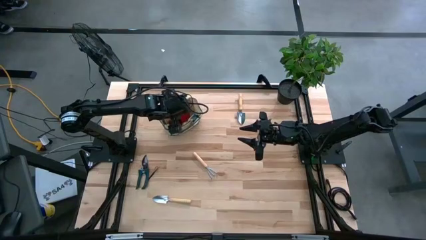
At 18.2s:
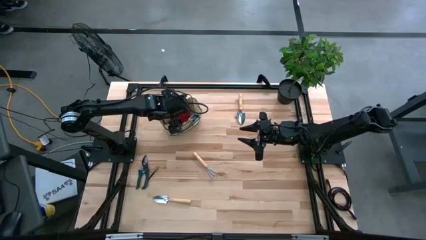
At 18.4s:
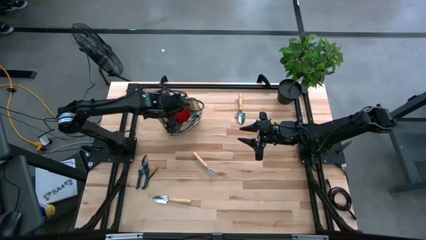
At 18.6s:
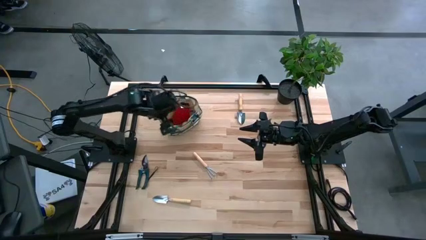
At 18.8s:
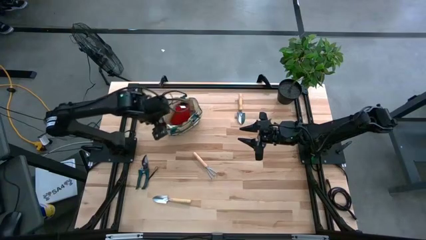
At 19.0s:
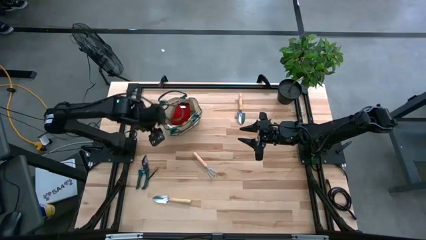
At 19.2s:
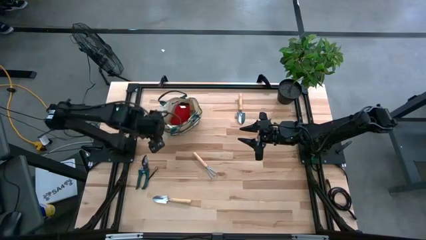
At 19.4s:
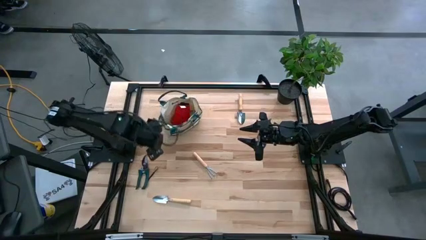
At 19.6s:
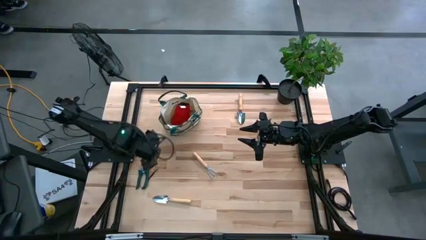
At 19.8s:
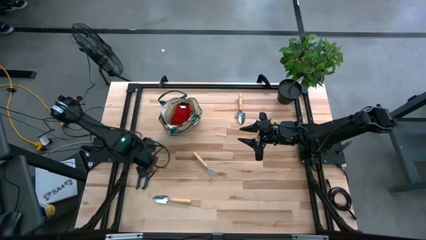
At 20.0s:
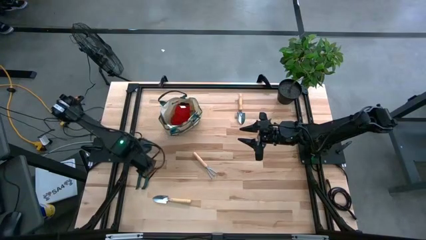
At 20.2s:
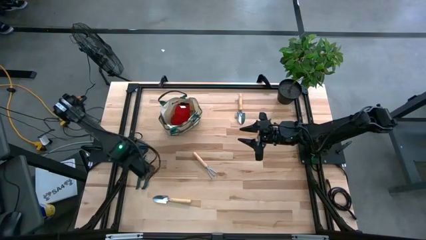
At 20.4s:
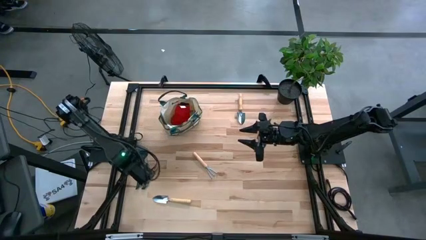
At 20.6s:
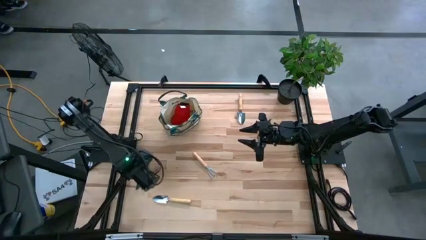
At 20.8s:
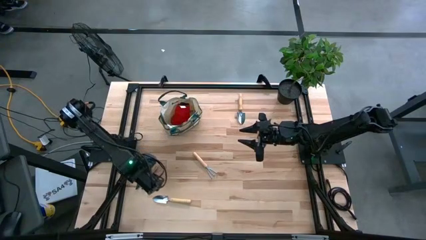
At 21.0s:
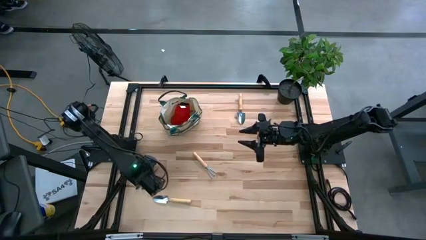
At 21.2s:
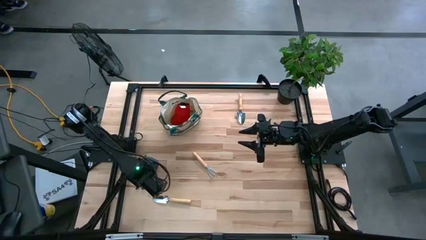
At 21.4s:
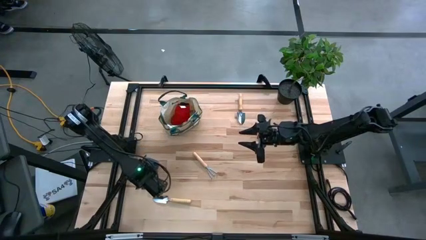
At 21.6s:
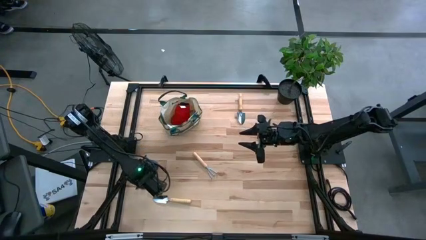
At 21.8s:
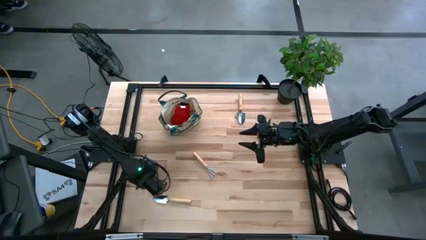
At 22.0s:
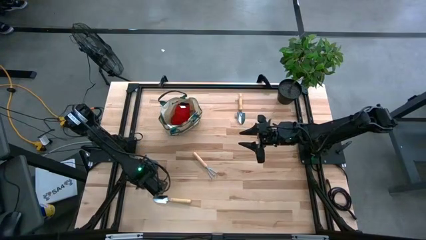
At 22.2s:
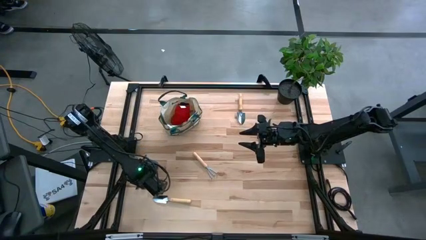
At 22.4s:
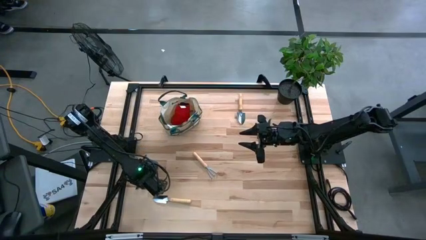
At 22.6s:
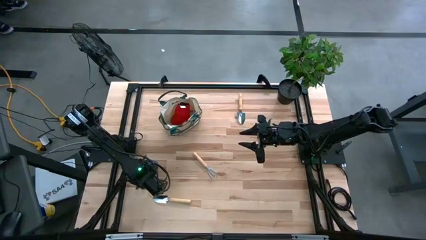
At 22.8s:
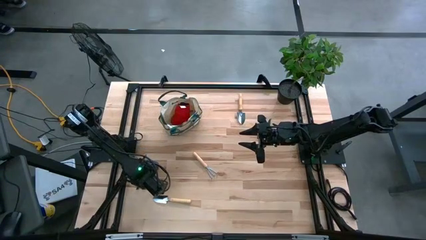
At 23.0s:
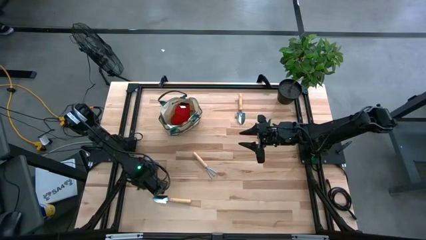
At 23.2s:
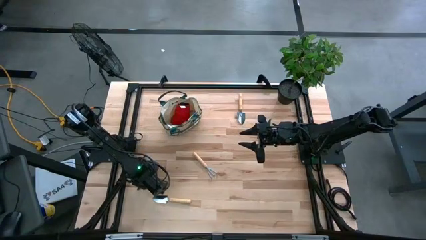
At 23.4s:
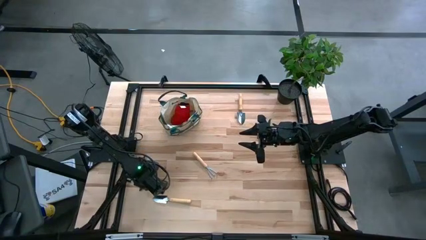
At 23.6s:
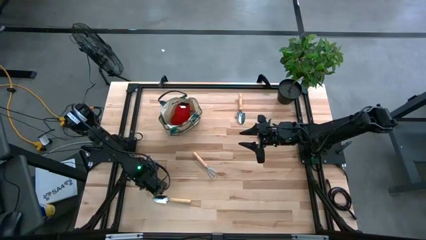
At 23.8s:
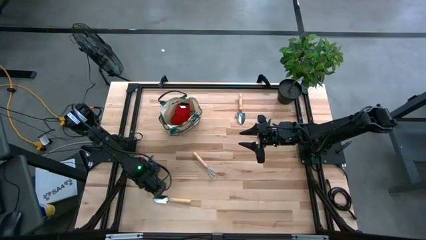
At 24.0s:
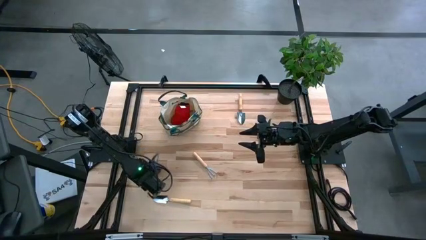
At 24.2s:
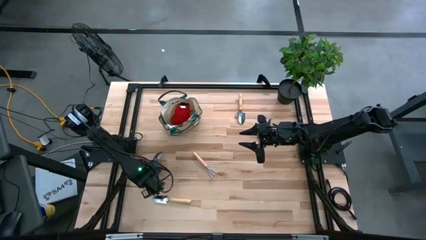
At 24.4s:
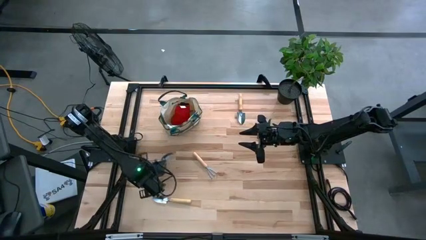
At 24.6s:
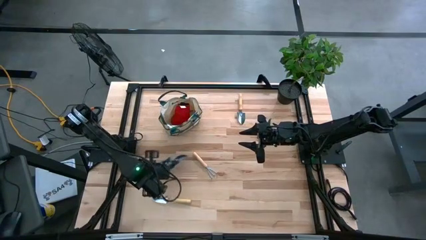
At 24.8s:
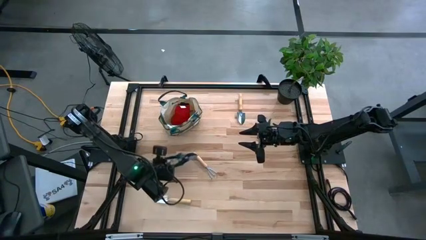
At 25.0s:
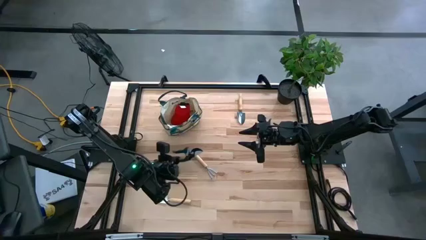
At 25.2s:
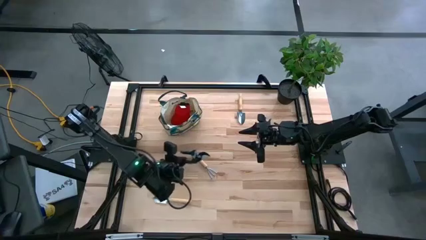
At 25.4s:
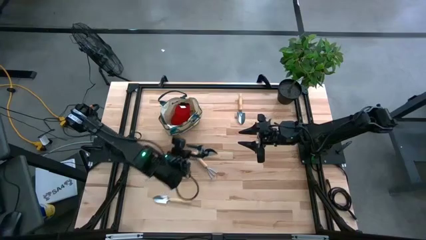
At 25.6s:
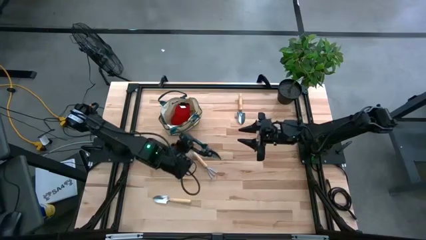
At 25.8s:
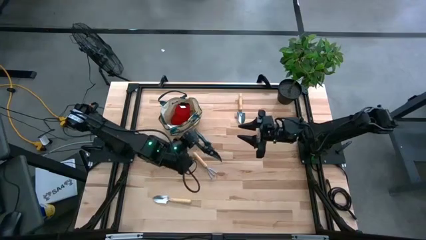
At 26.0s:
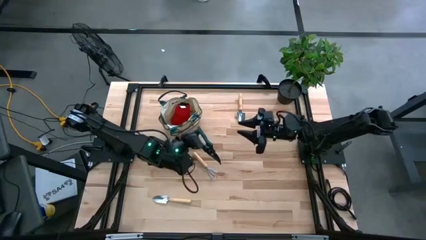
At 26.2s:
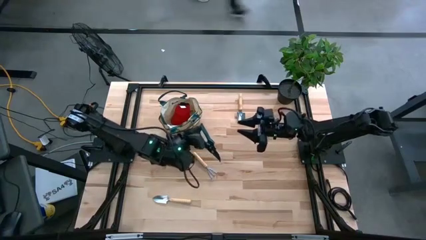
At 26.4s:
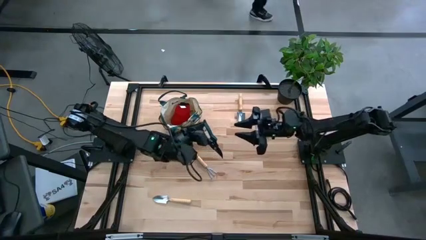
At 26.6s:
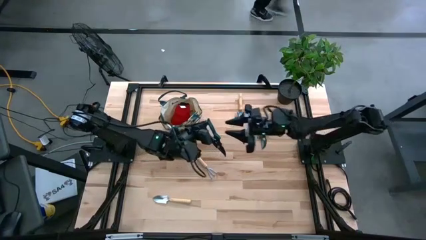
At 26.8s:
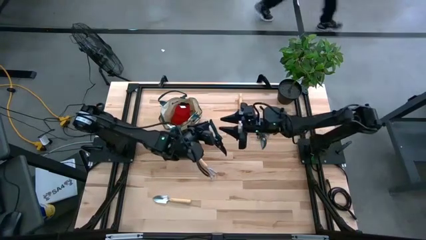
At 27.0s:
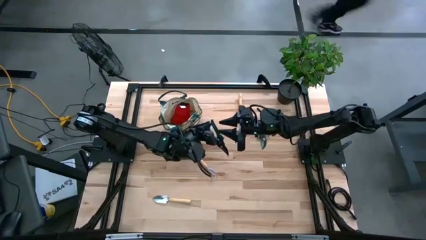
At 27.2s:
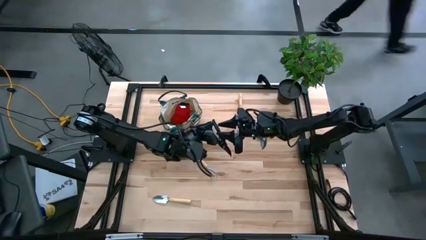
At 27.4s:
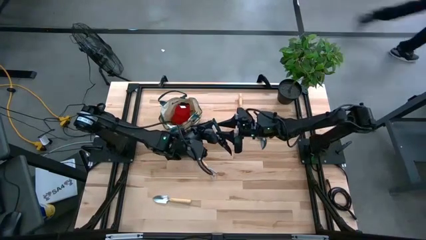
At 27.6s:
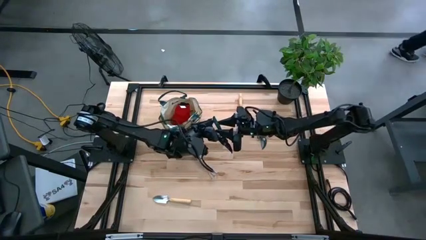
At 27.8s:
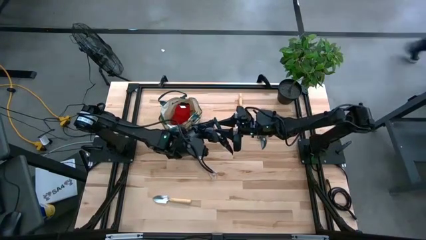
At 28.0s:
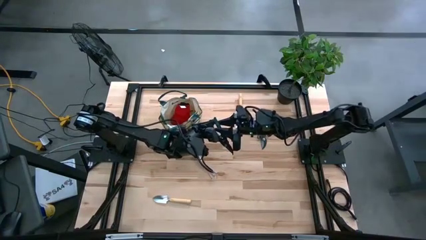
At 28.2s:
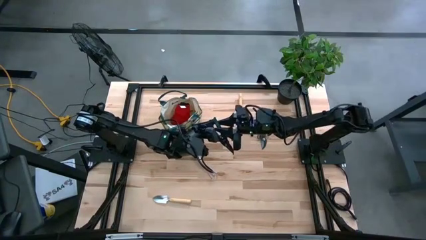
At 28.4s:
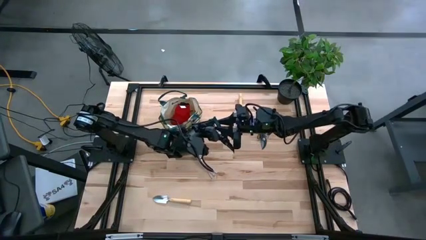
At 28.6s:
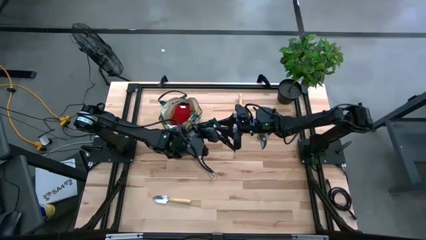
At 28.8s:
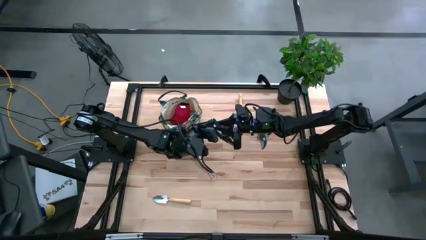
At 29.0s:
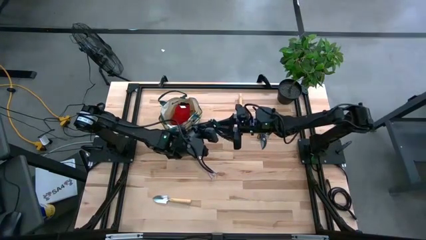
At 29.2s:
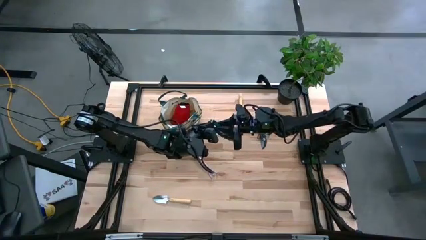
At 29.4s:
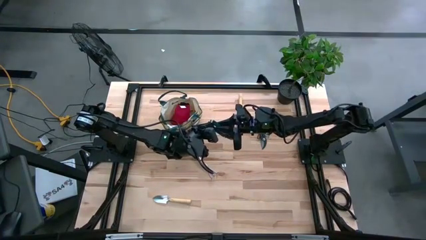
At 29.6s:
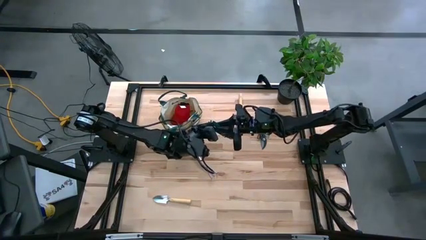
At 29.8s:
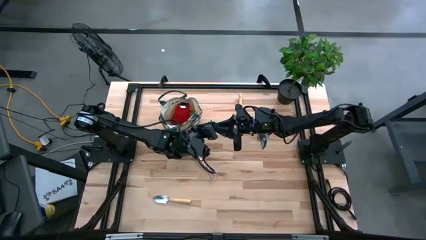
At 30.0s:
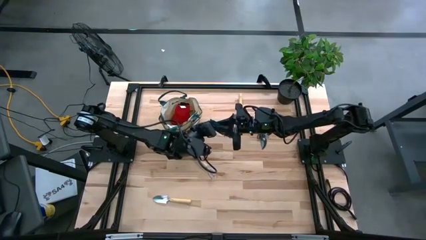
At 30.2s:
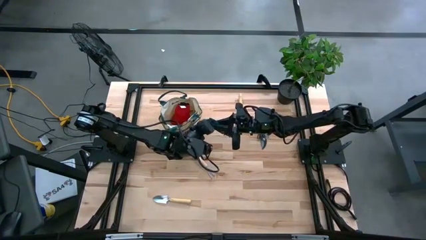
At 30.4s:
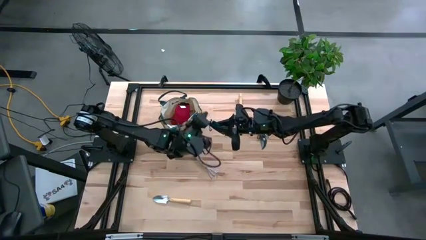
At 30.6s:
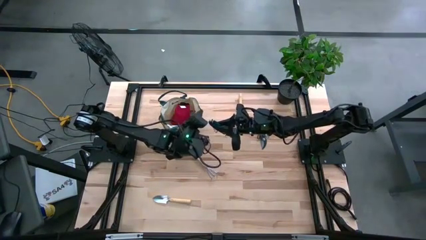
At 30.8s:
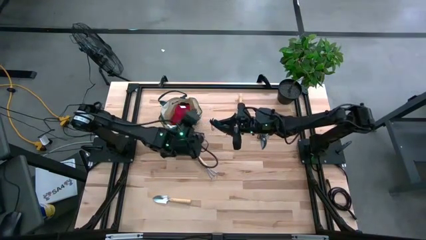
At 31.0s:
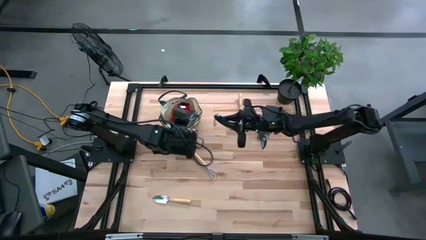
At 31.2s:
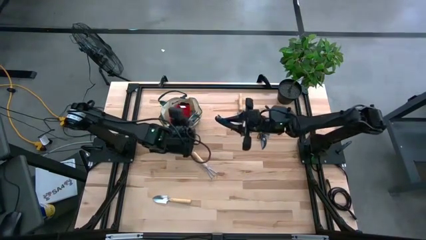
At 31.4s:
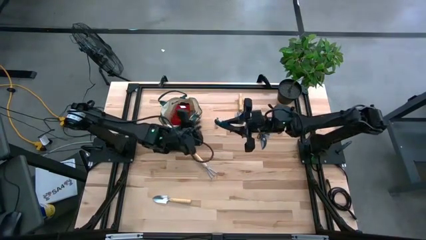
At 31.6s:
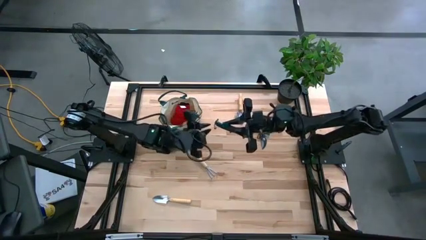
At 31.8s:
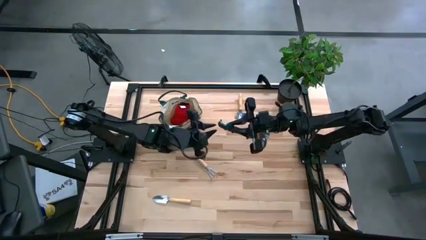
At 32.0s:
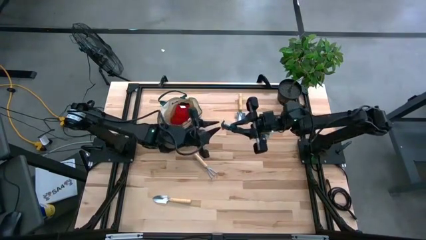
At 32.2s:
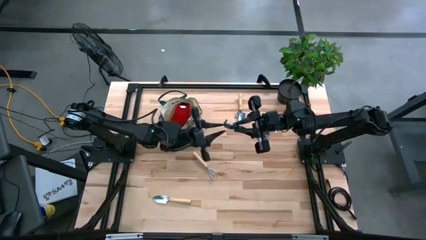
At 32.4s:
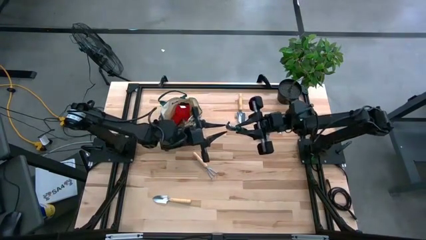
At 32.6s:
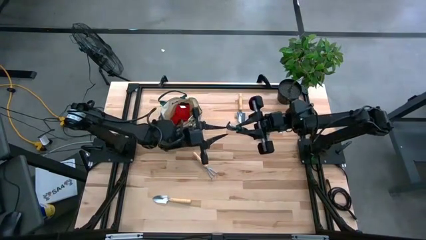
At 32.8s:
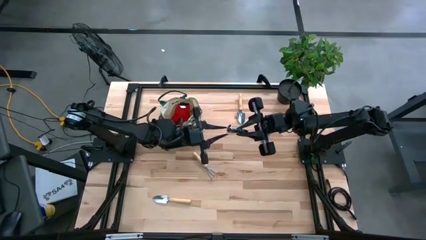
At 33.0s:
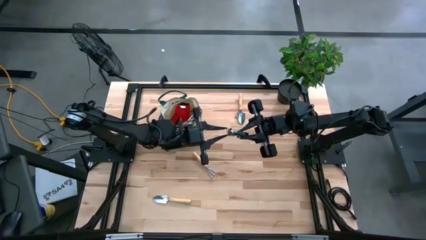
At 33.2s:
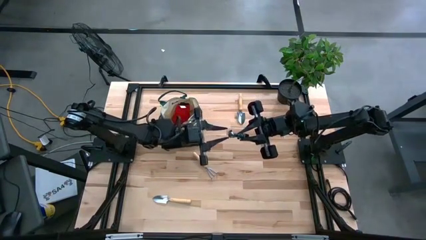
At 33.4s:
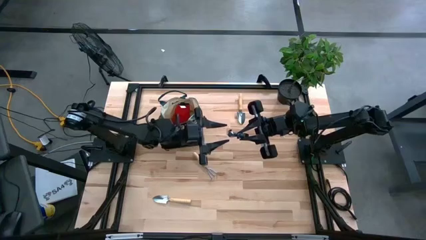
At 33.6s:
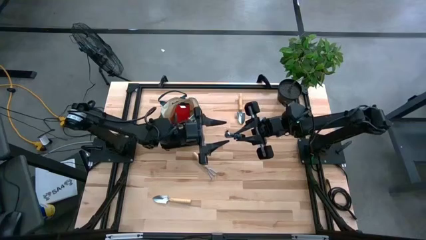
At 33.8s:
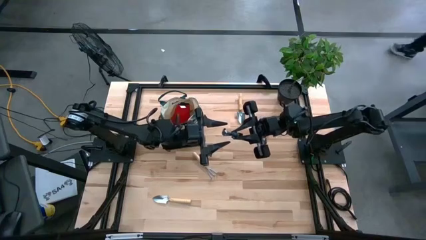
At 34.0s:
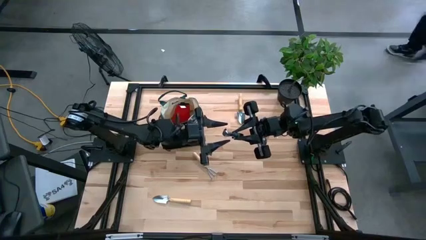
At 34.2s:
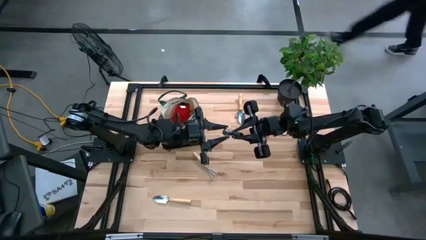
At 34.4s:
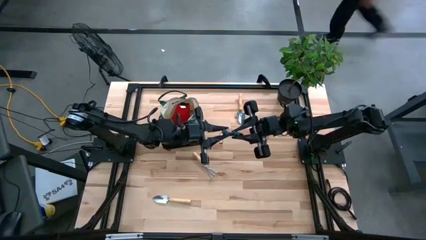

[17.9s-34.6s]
Task: Pick & Place Garden tools in Gardening bag
Put the green shears into the gardening bag
